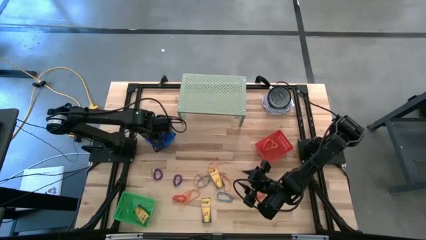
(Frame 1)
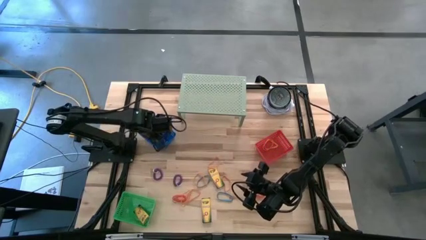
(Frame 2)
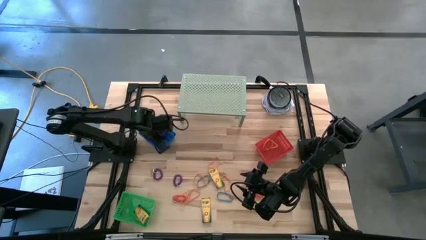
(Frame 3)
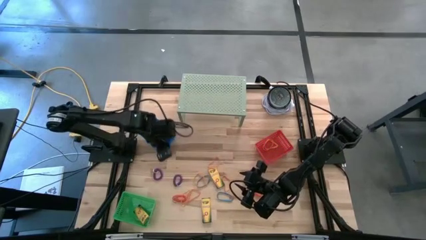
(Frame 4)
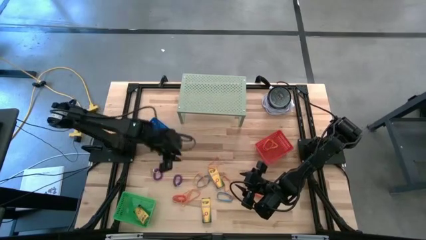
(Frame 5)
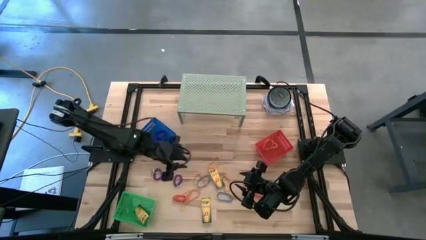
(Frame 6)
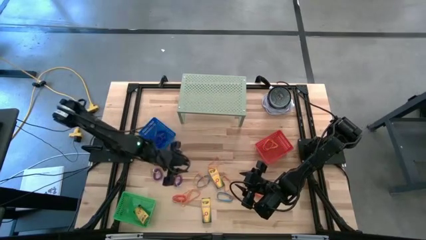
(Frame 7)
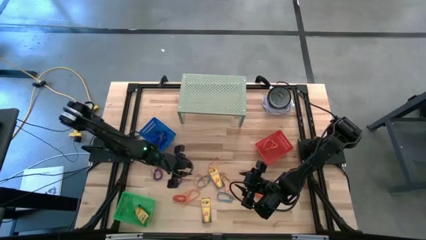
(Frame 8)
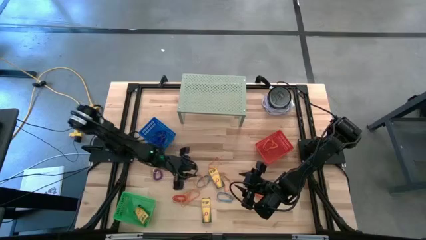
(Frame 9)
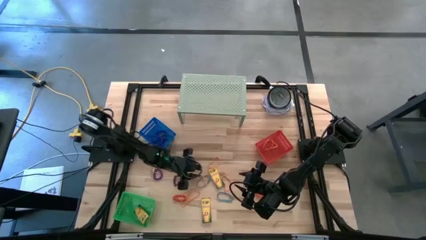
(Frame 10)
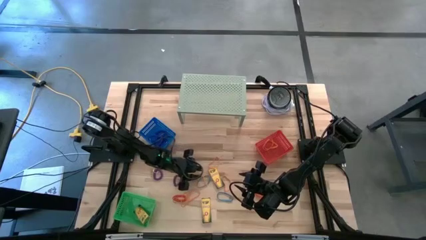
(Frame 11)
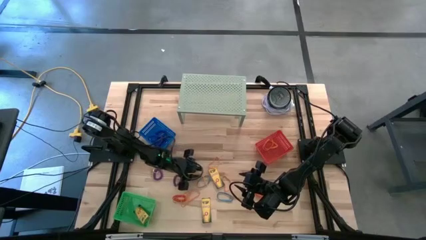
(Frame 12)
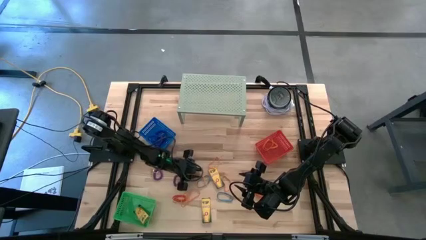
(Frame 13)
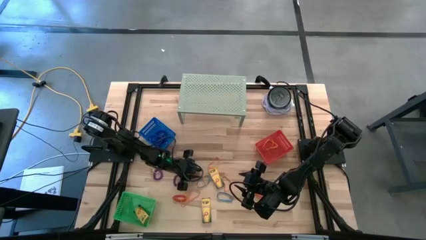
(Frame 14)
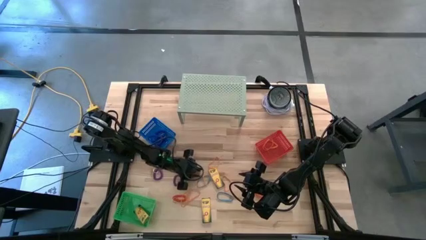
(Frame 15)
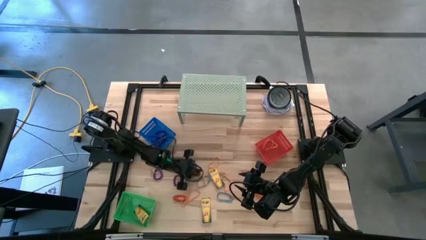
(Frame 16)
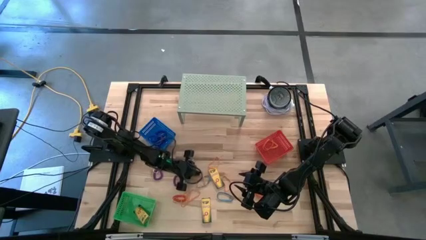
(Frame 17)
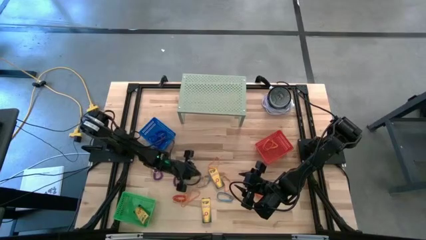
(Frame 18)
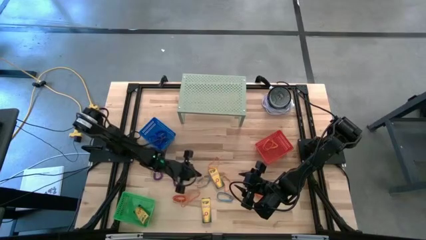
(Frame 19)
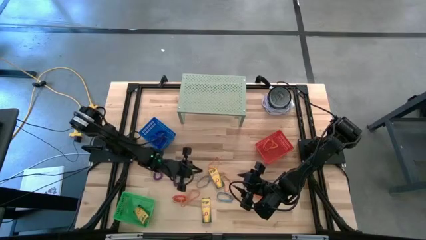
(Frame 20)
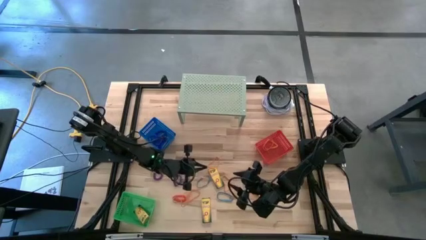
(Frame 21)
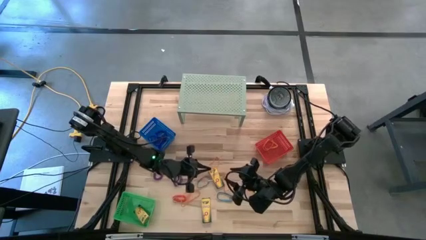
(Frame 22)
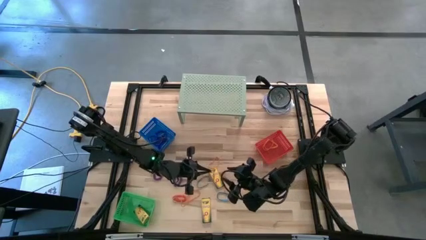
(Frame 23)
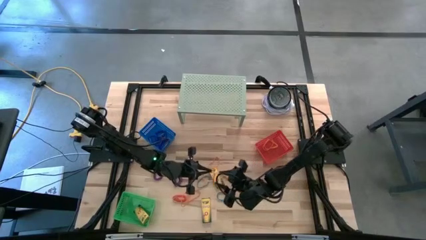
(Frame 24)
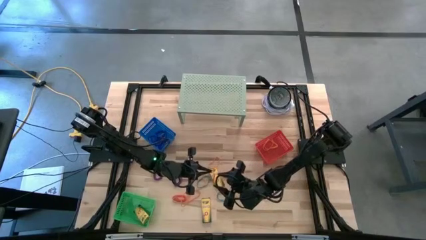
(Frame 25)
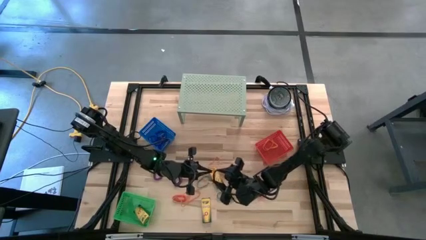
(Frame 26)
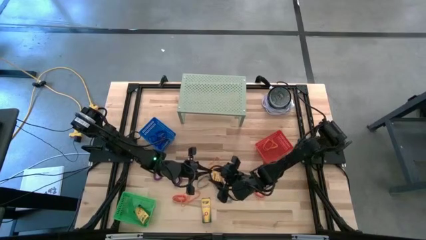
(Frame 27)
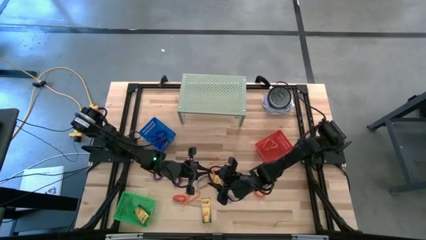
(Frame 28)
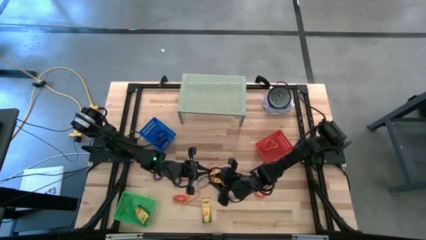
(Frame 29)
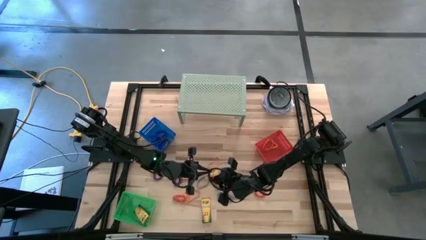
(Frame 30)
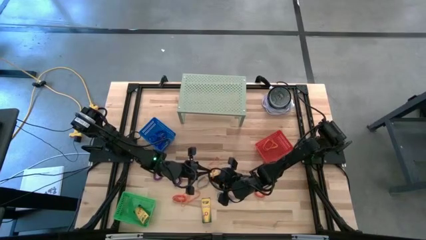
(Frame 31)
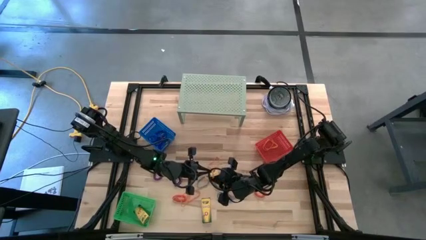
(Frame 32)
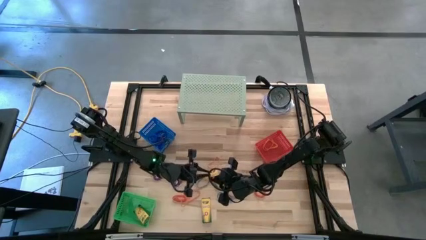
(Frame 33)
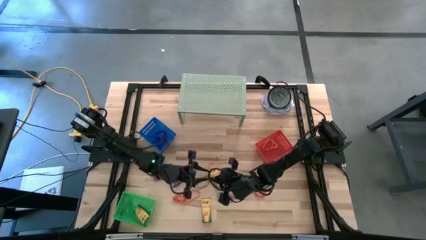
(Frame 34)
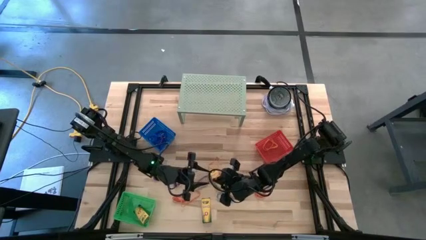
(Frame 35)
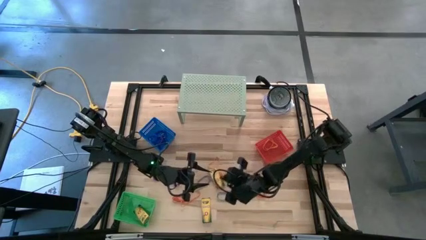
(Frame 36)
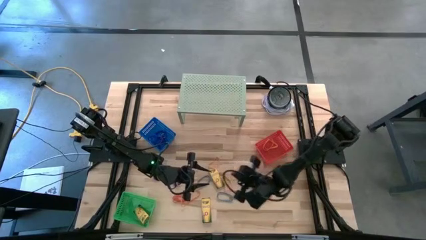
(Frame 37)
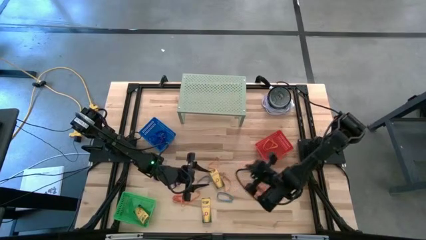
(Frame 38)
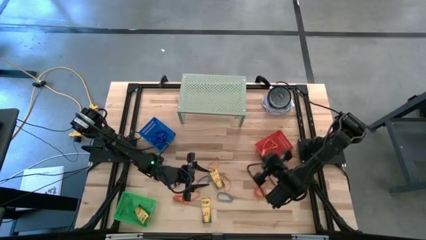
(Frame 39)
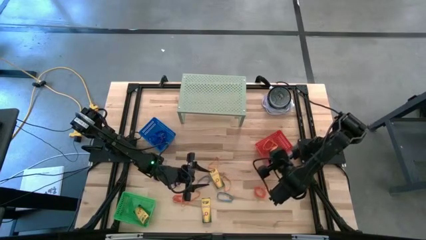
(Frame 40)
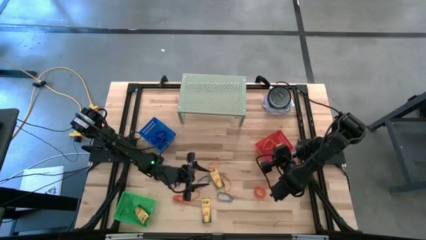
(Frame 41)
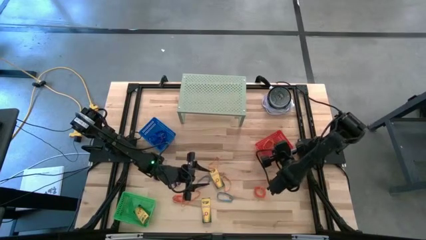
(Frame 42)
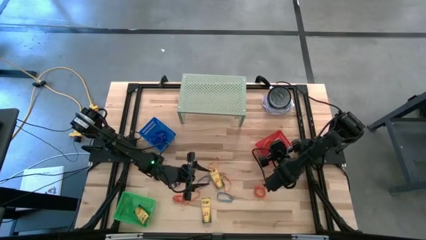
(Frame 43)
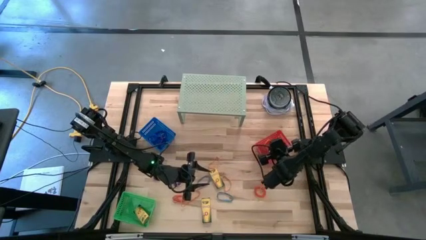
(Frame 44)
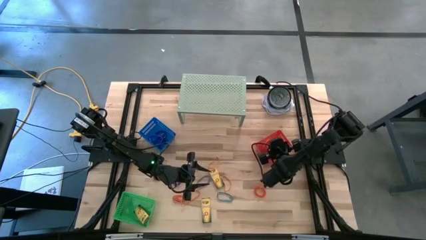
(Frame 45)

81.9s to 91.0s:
Task: Pick & Place Office Desk Supplies
Put the orange rubberband into the red bin

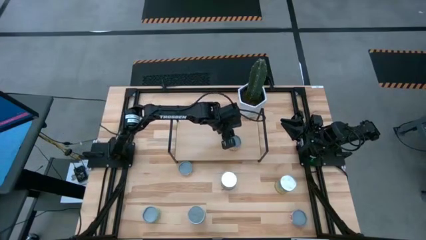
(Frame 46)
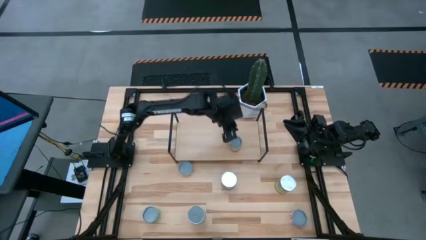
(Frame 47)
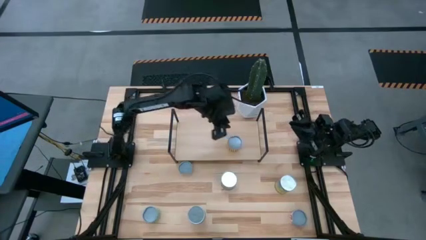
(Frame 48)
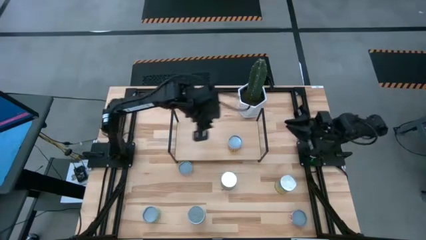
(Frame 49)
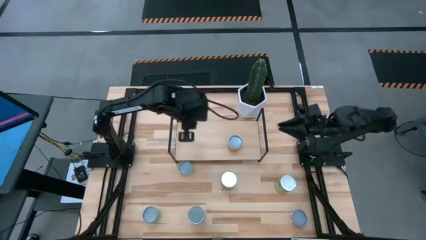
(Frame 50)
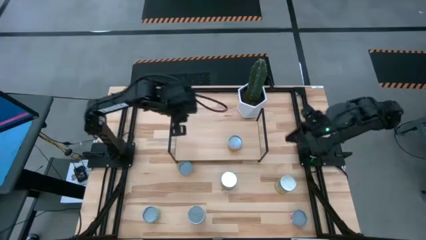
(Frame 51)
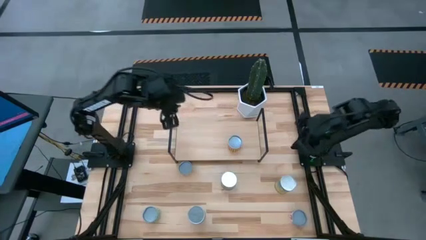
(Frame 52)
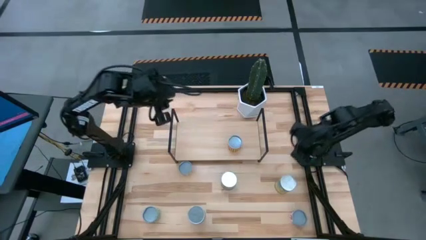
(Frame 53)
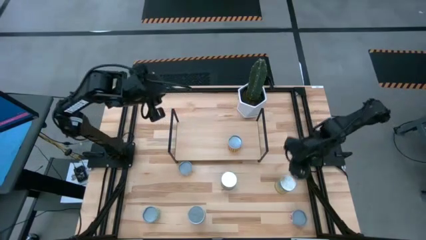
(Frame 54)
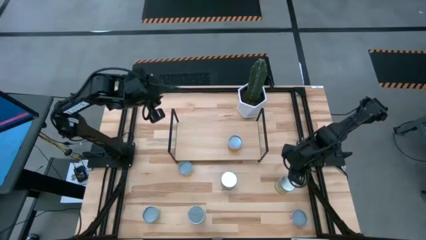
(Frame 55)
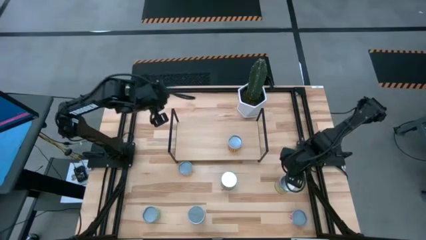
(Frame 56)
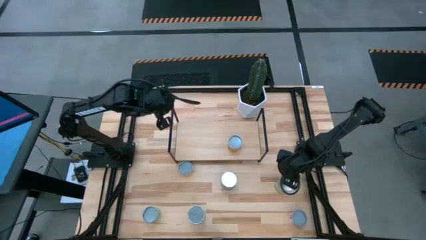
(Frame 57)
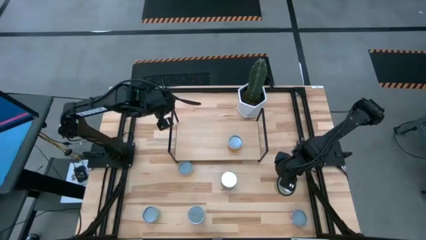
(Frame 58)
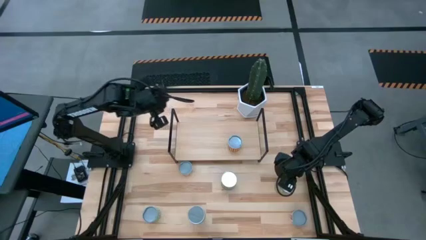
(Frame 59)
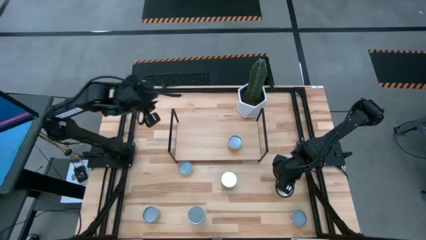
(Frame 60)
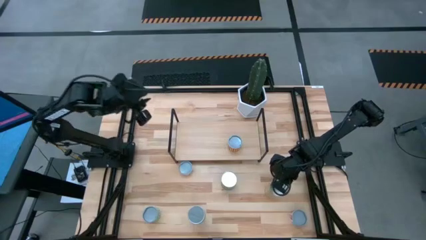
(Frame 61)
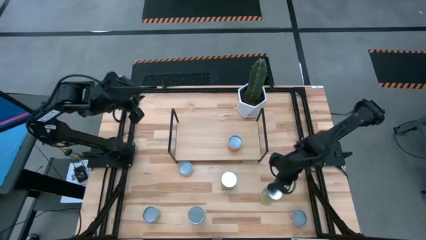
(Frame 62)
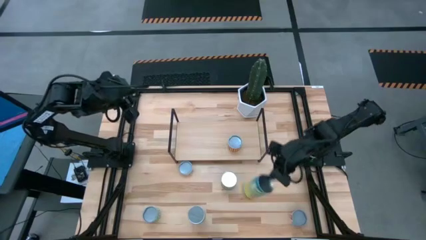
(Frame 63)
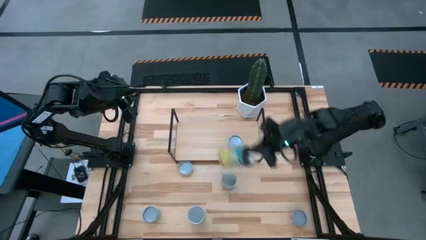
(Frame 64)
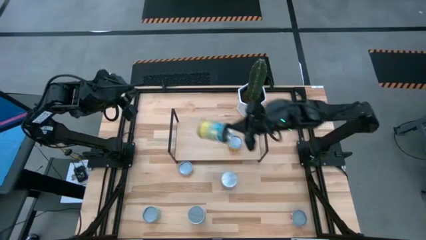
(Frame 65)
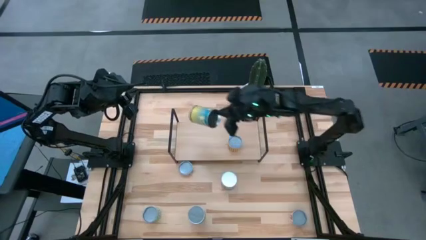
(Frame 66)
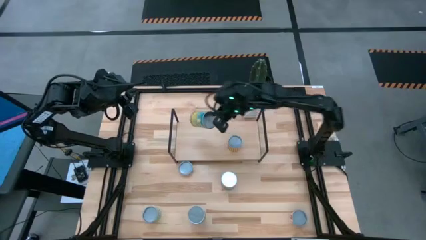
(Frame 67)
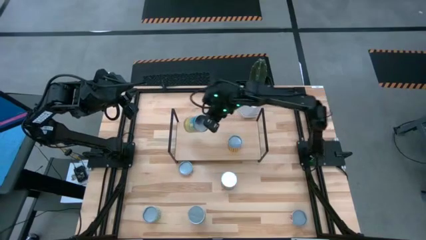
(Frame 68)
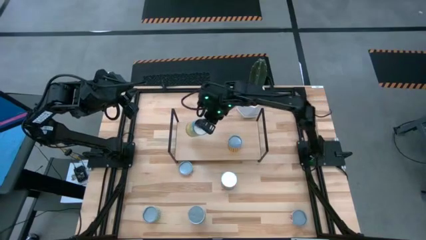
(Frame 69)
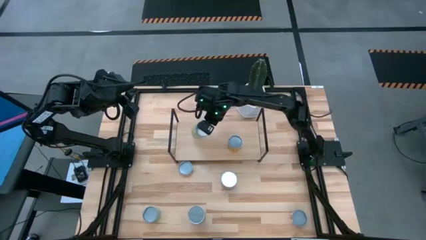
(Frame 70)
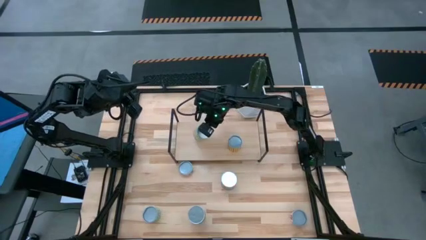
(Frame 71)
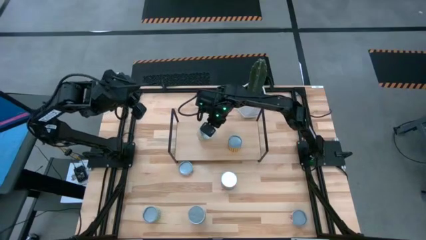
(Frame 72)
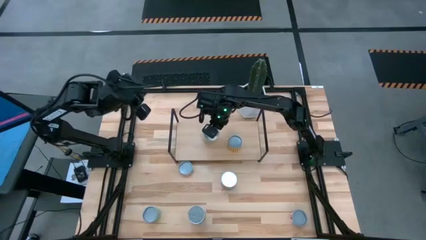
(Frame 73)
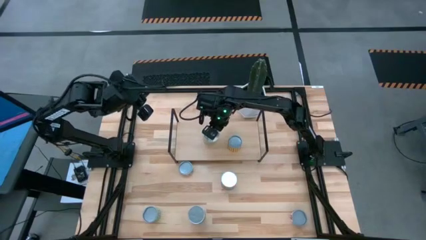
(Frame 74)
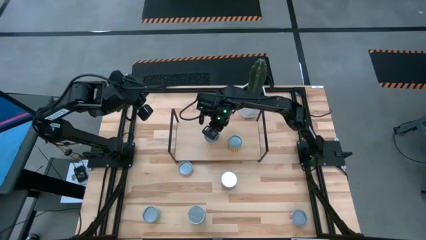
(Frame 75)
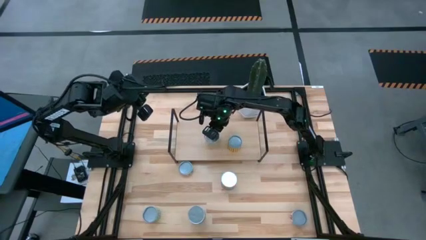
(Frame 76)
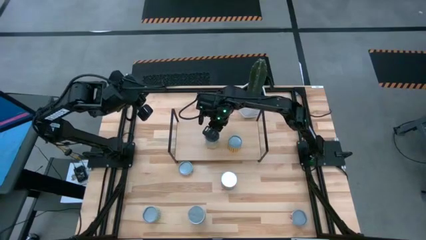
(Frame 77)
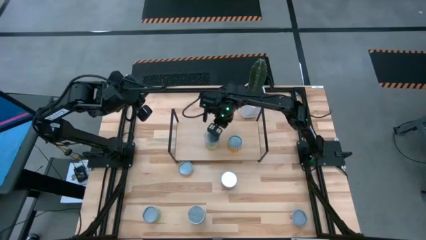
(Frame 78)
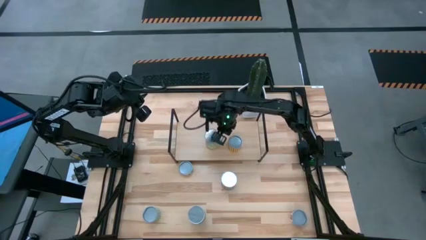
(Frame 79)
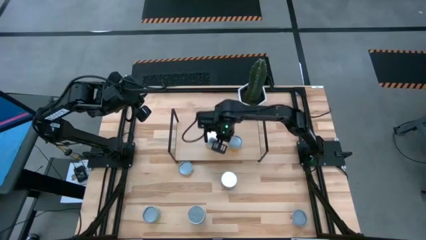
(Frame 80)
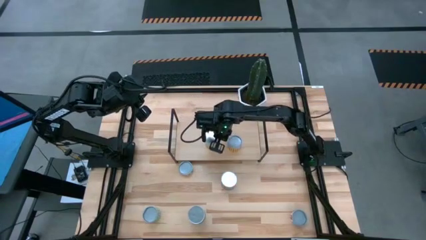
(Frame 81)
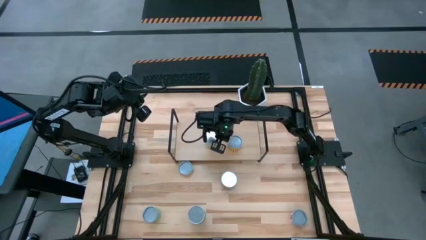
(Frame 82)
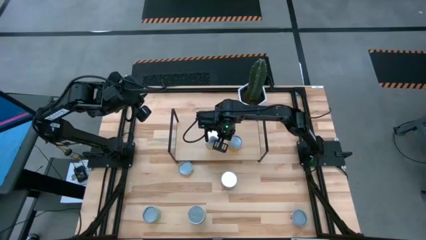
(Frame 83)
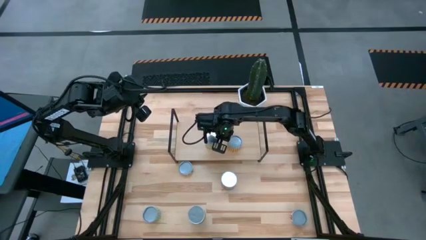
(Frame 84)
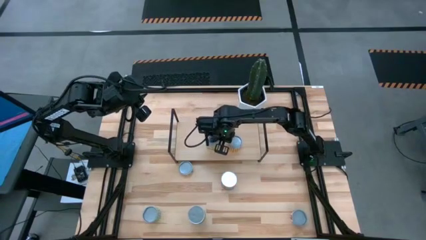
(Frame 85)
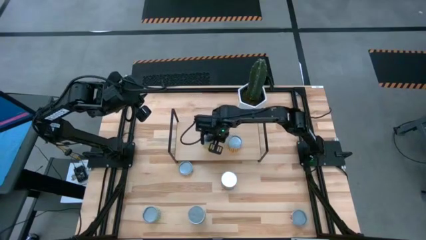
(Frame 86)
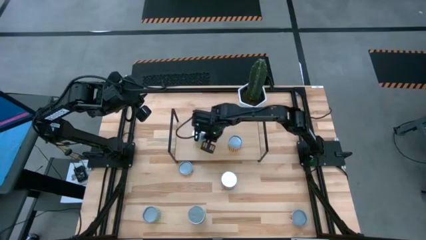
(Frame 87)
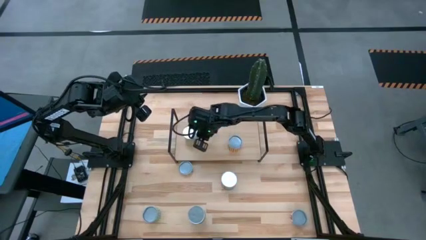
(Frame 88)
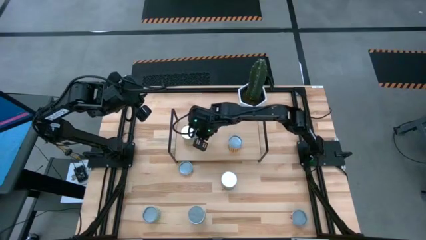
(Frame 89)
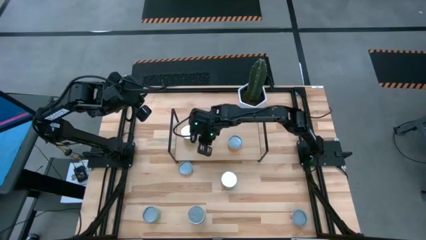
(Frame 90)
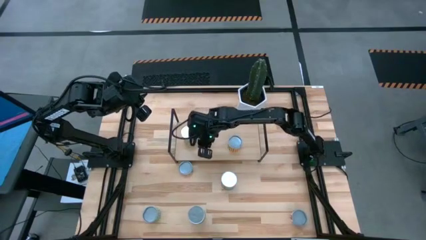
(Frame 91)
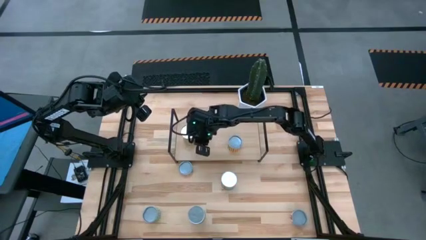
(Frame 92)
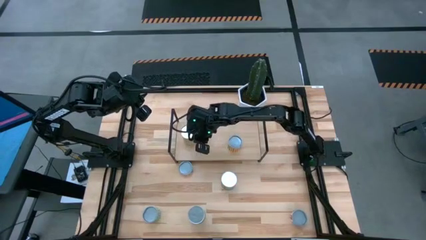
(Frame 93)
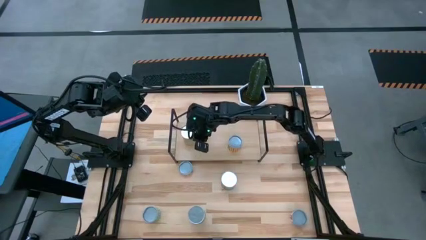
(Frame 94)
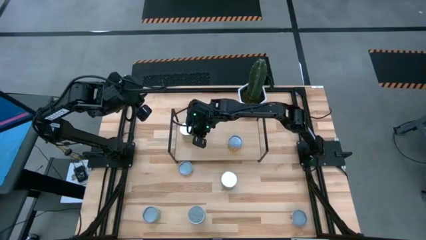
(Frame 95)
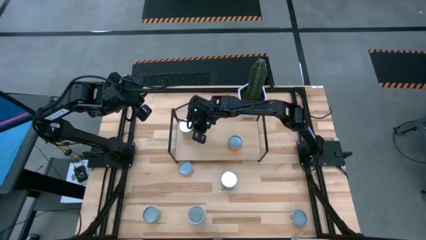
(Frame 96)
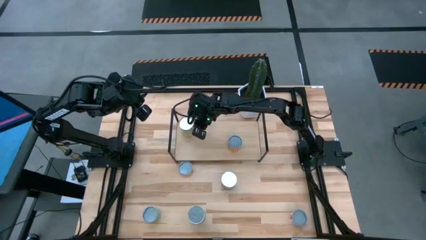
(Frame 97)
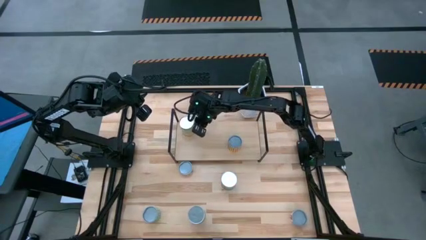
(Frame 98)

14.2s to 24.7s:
Task: Pick and place cans onto a shelf
Put the big canned carrots on the shelf
